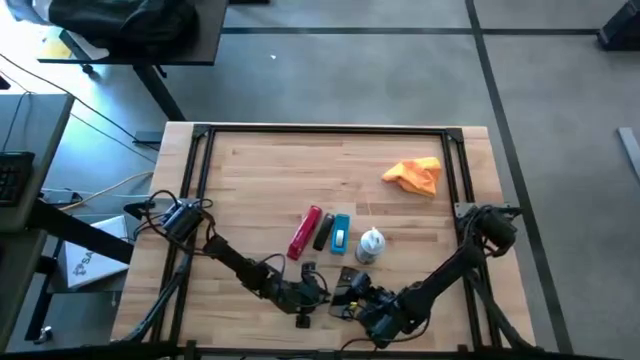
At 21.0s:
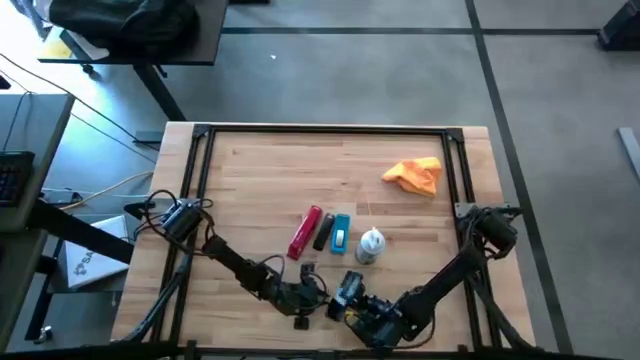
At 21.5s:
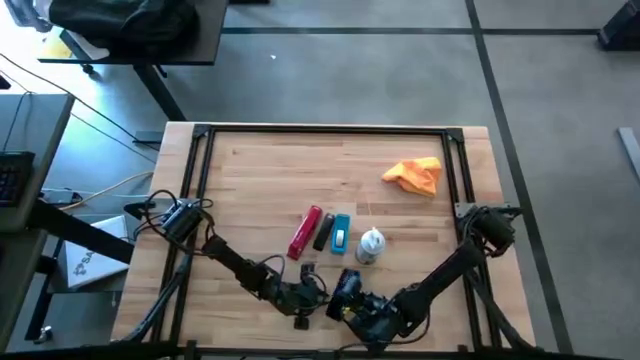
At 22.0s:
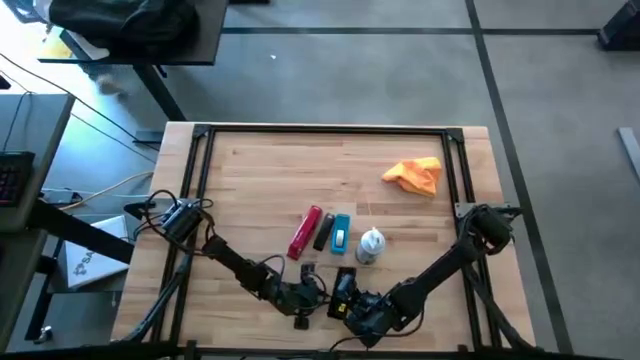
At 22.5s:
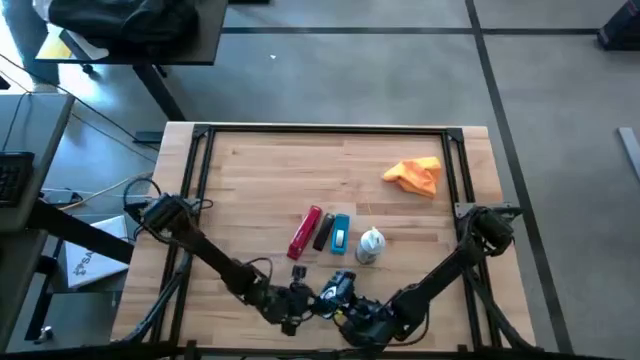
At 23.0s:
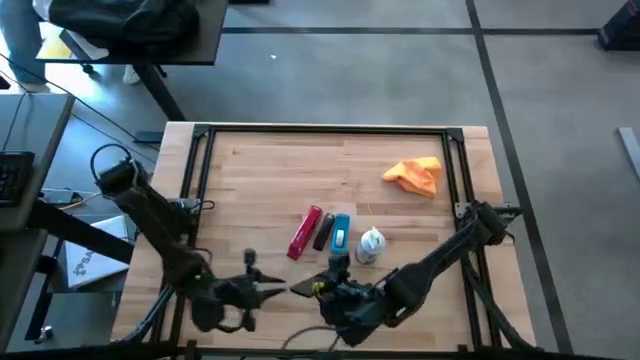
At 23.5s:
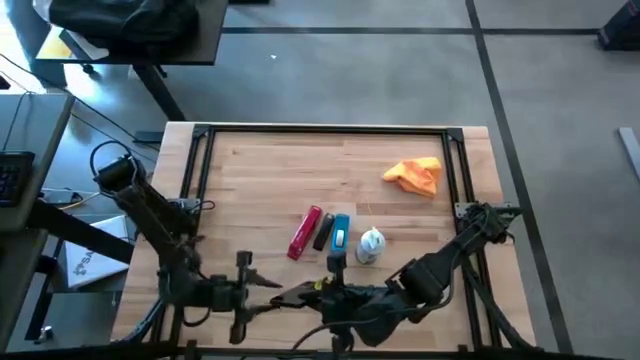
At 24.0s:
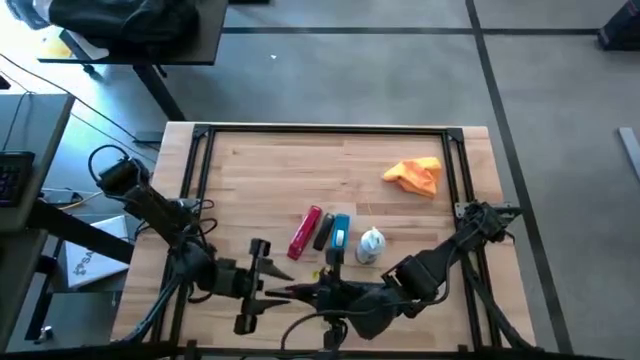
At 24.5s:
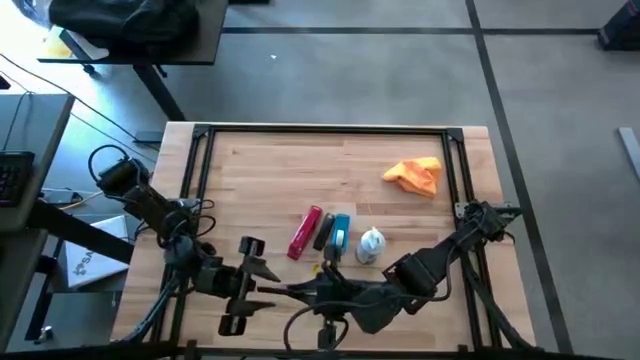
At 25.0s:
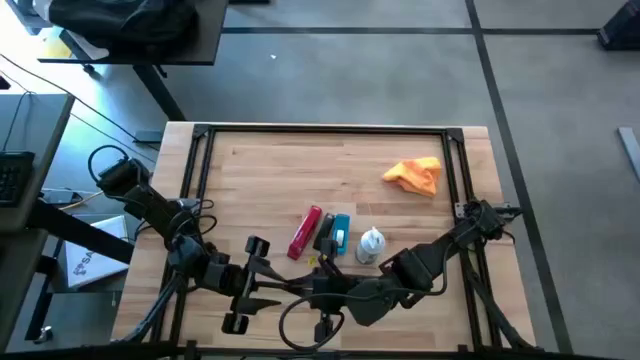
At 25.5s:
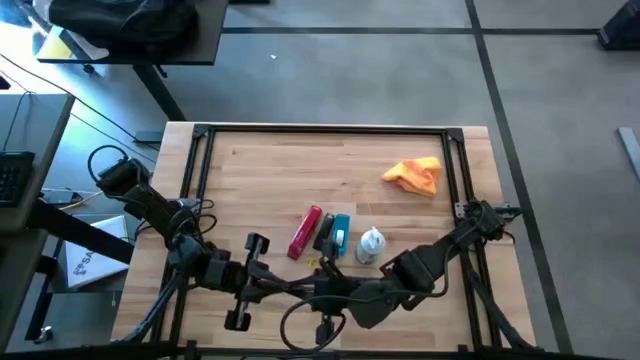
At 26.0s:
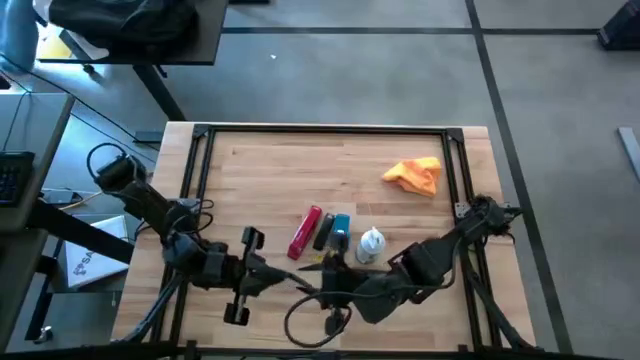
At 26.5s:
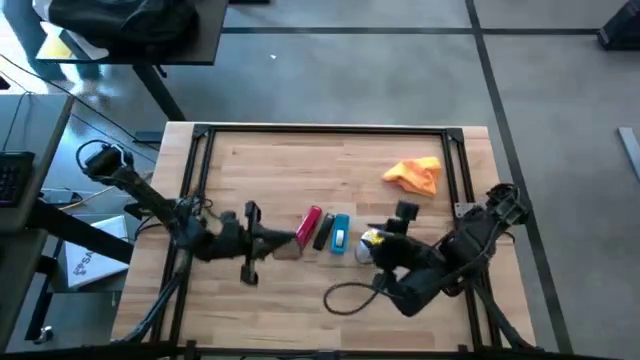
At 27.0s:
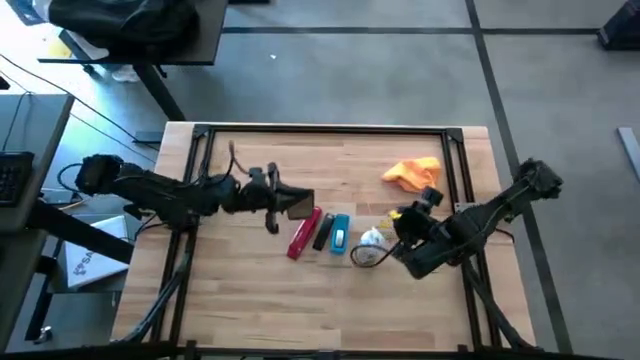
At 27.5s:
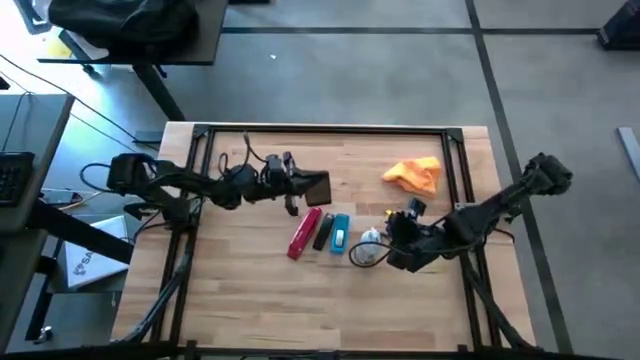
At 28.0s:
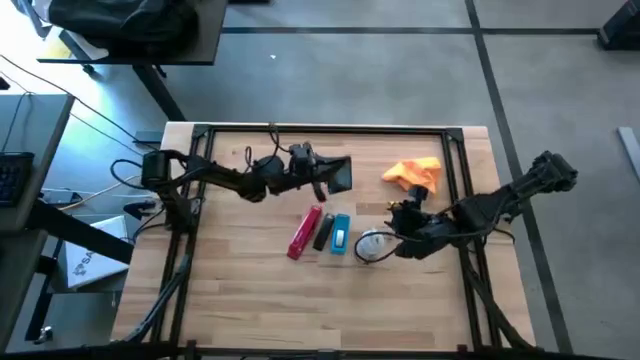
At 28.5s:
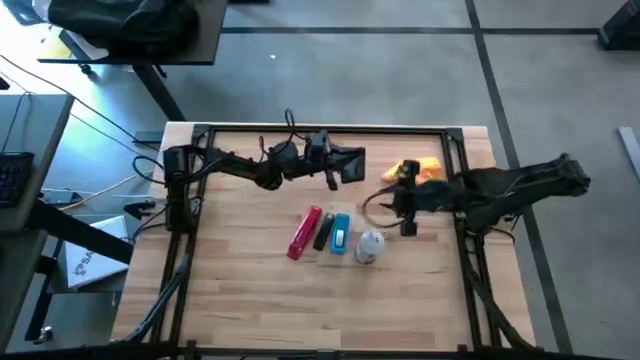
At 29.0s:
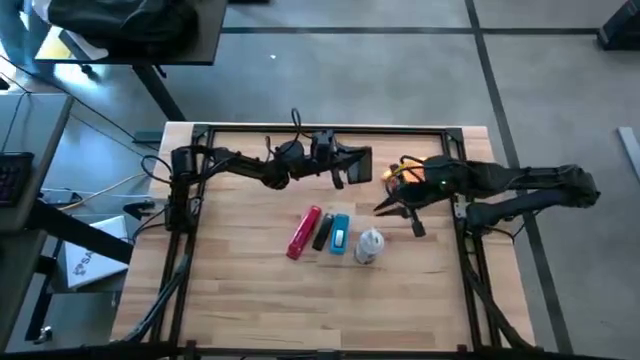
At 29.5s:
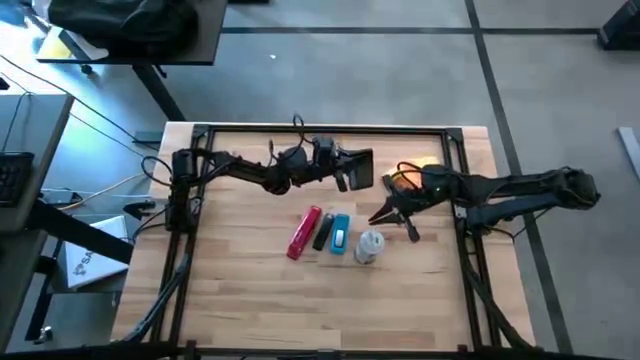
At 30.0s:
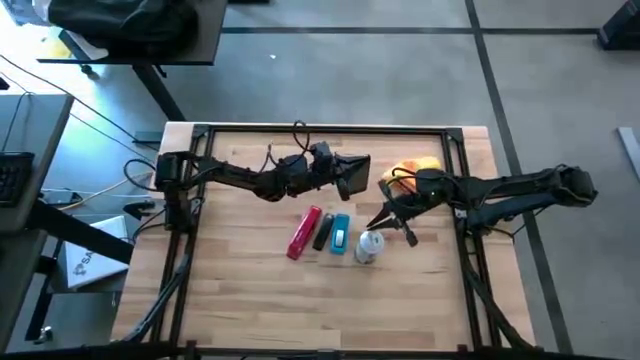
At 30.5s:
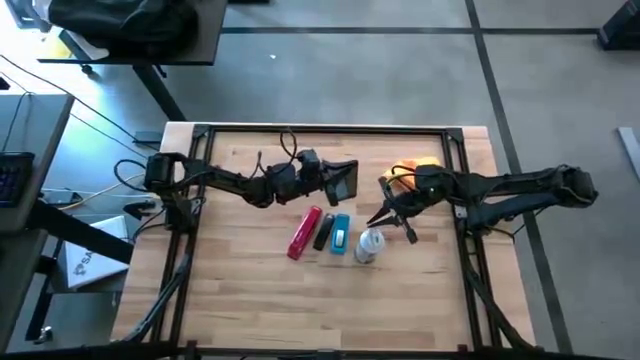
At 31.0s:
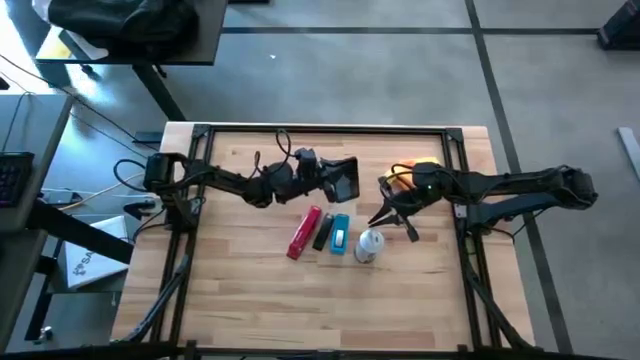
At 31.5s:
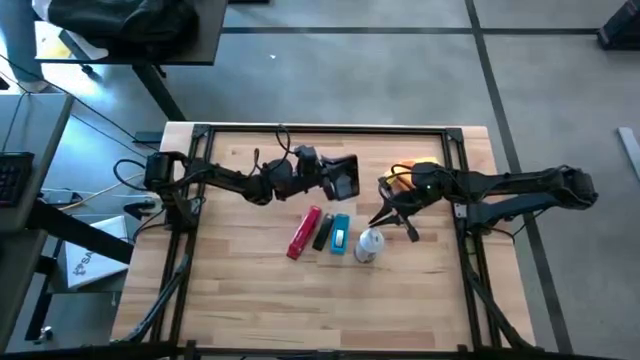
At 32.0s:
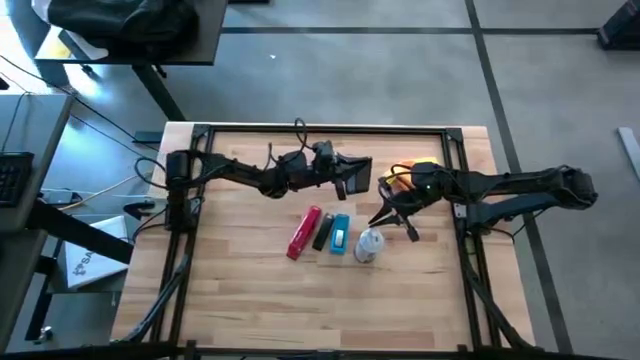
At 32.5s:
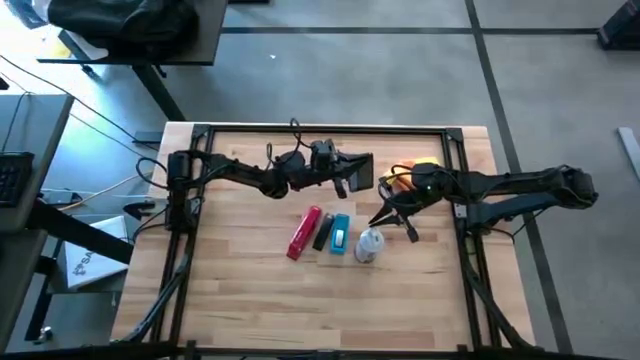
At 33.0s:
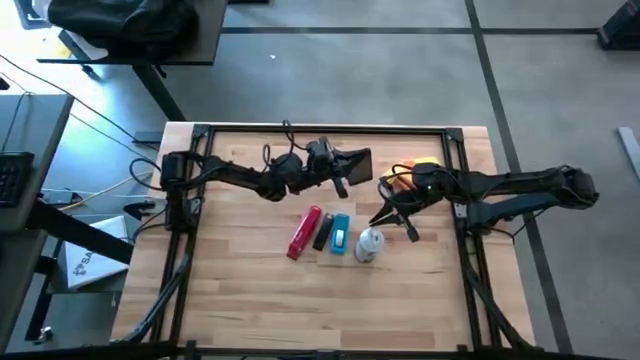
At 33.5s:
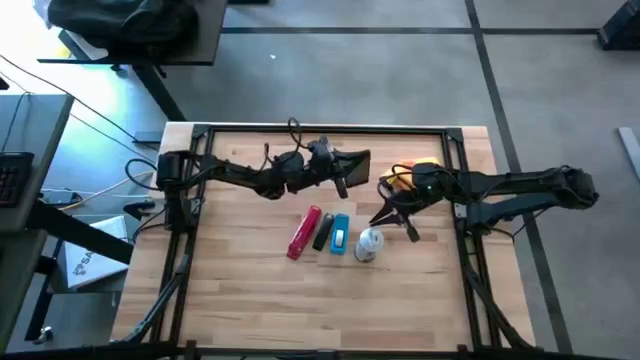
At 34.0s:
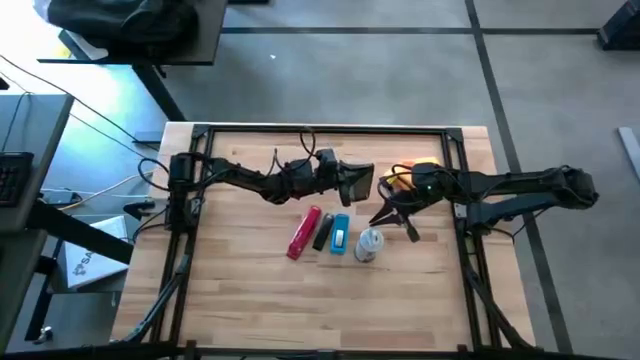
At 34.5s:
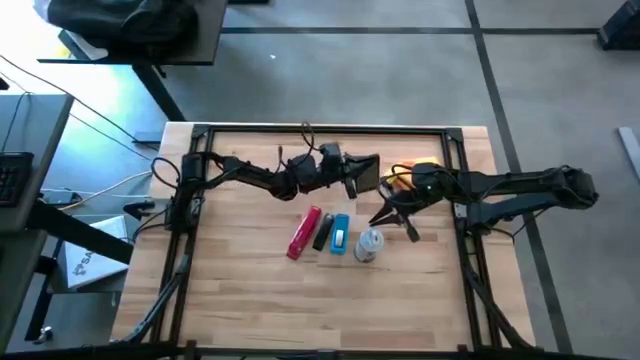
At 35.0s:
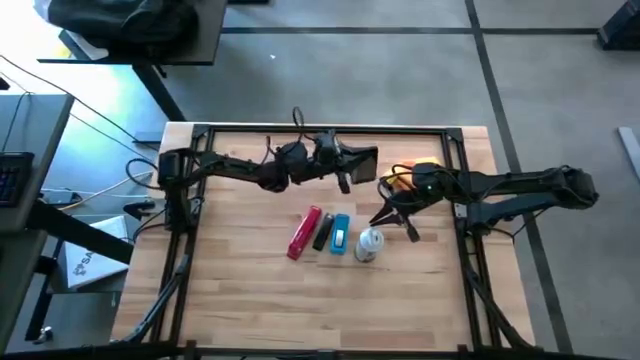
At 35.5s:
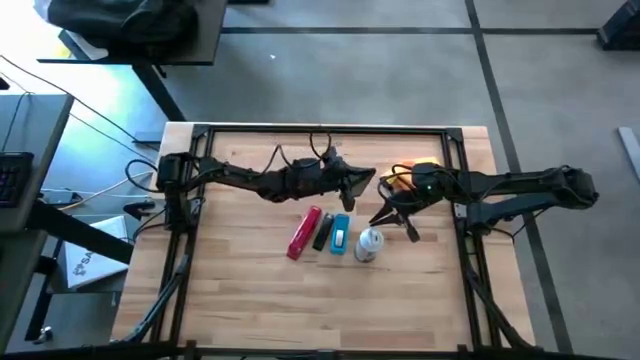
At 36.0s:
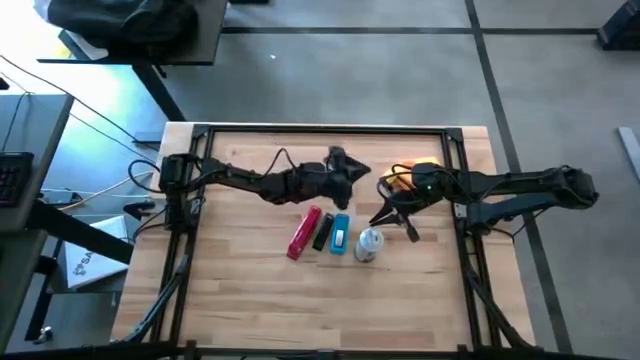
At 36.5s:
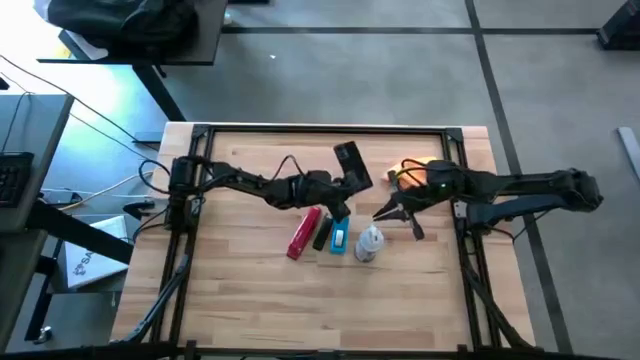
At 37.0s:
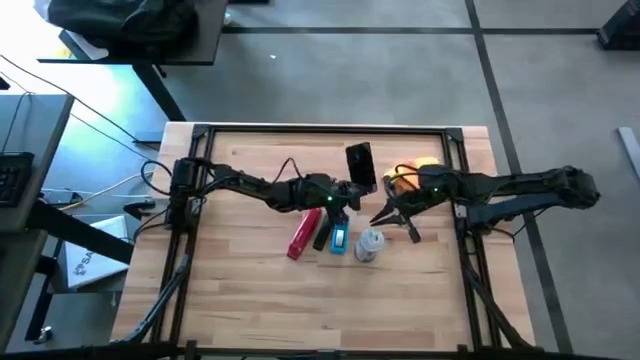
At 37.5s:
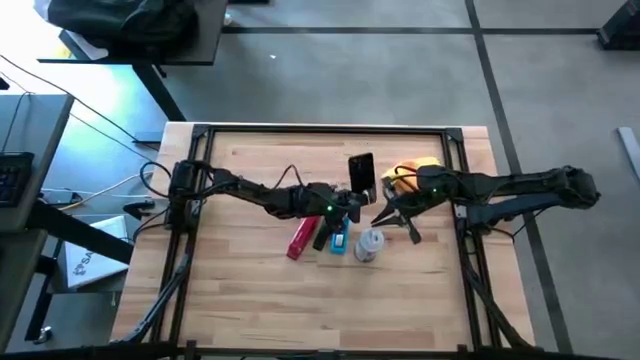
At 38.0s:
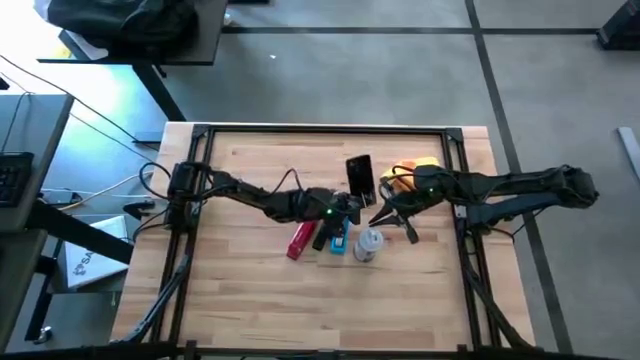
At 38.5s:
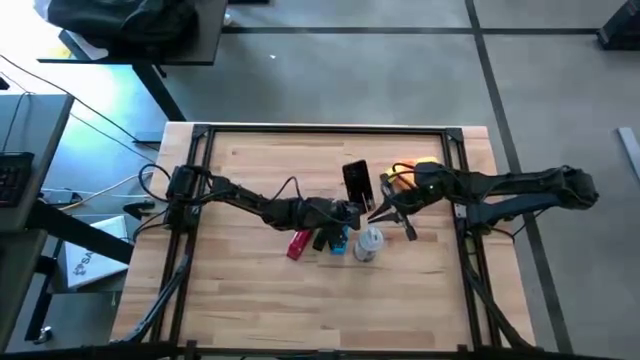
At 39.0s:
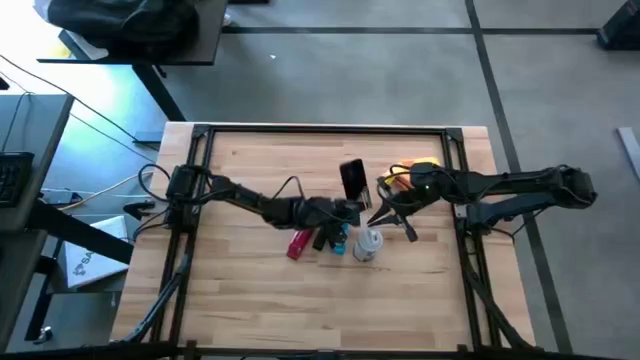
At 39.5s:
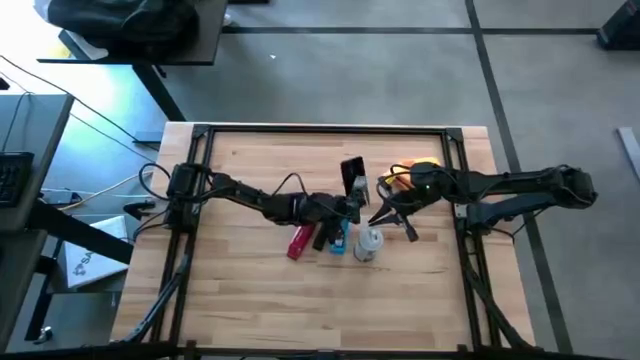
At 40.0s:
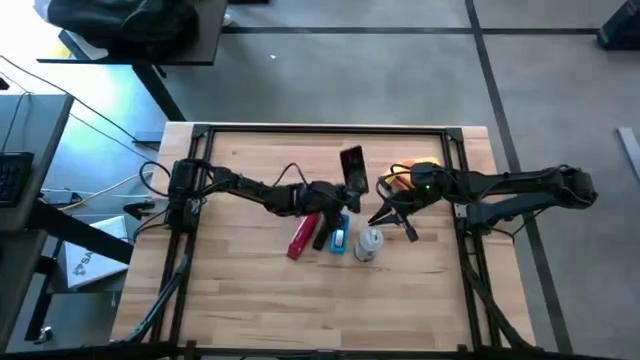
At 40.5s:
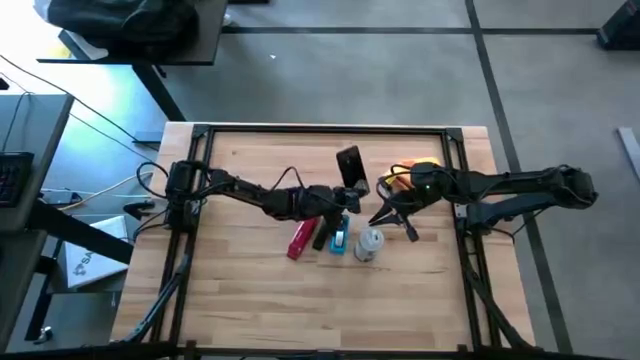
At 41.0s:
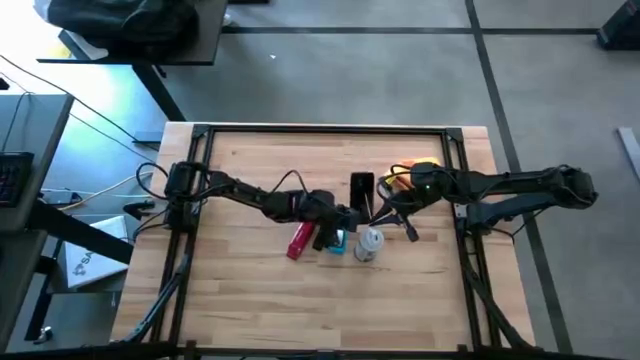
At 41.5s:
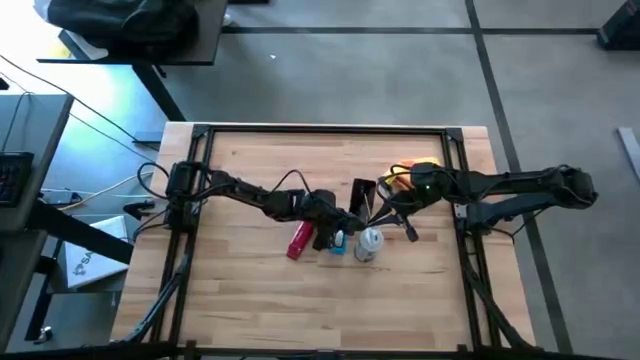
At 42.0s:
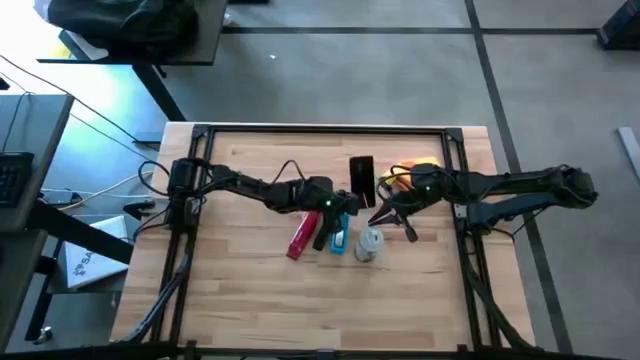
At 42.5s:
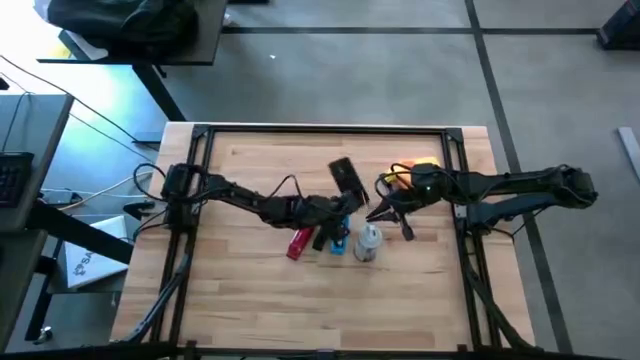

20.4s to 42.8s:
Task: Apply microfiber cloth
Spray the black cellphone using the white spray bottle
